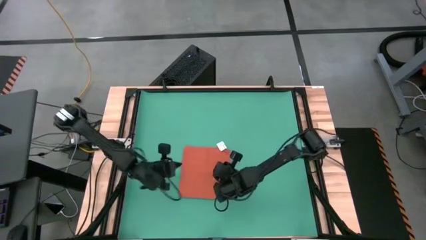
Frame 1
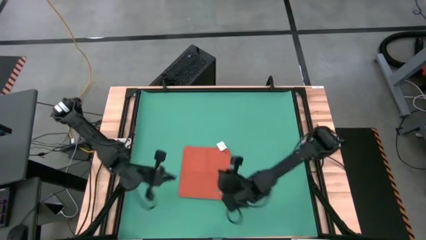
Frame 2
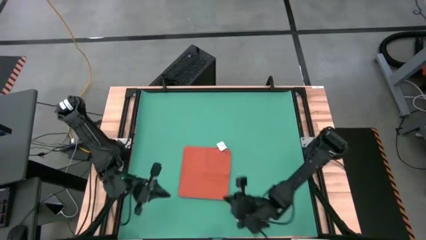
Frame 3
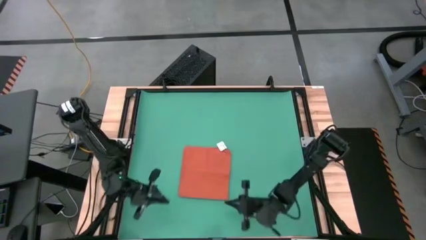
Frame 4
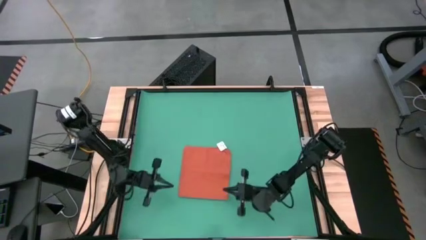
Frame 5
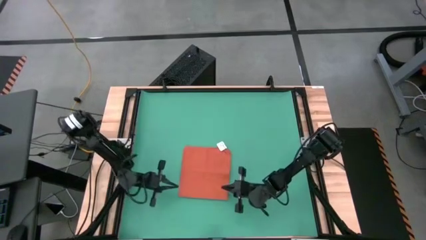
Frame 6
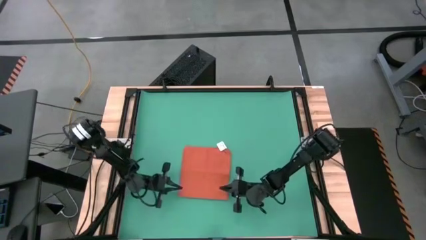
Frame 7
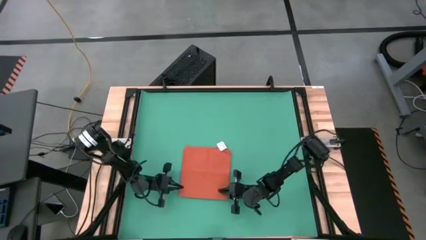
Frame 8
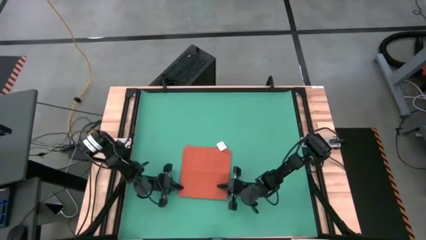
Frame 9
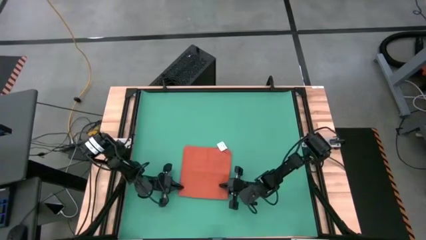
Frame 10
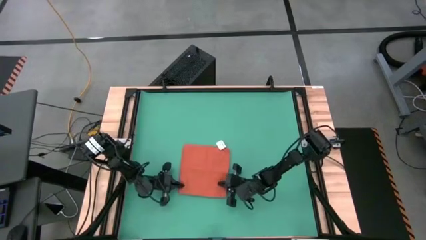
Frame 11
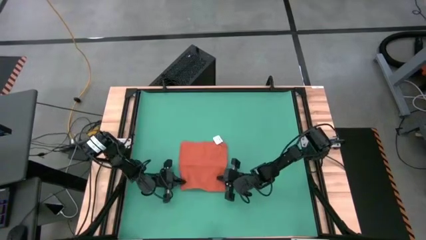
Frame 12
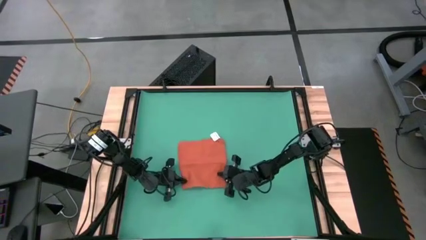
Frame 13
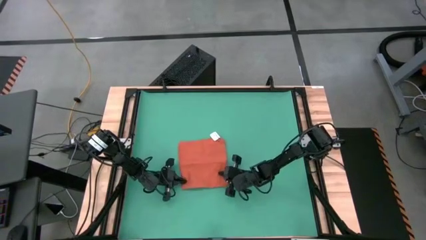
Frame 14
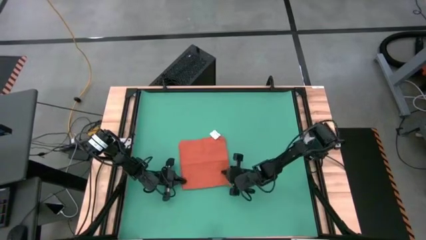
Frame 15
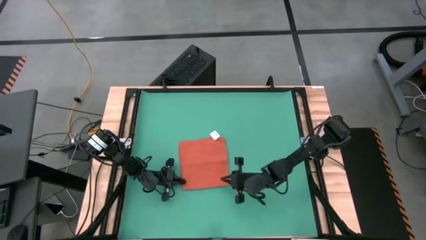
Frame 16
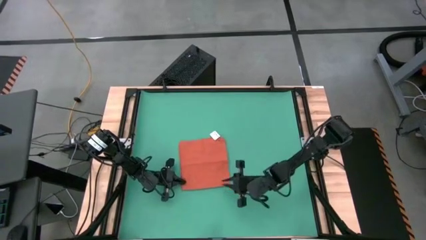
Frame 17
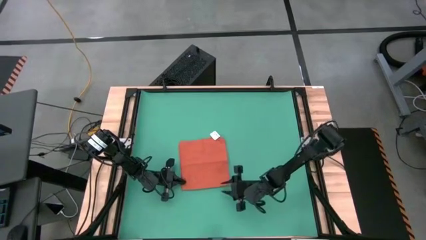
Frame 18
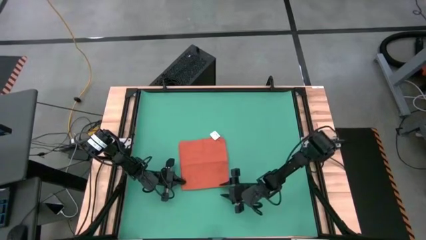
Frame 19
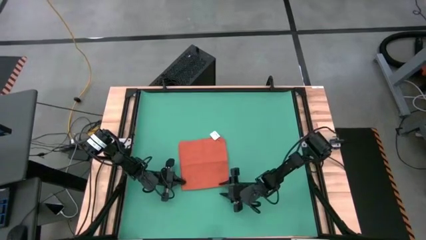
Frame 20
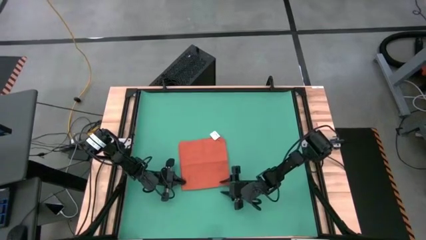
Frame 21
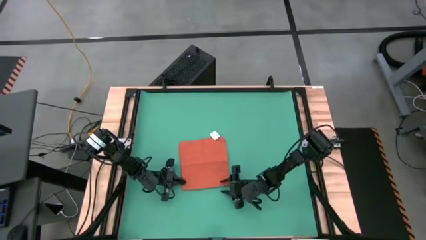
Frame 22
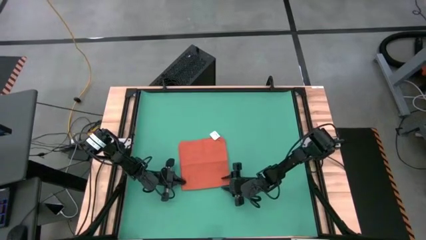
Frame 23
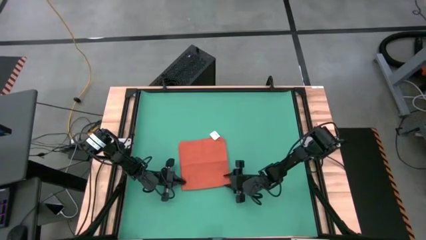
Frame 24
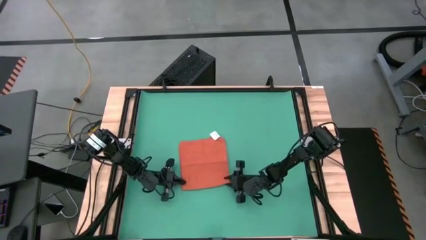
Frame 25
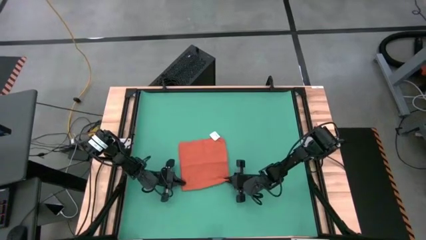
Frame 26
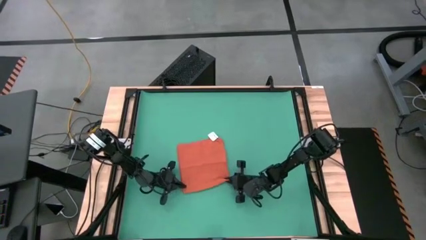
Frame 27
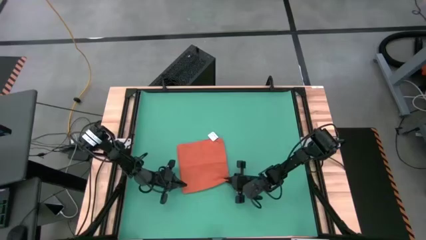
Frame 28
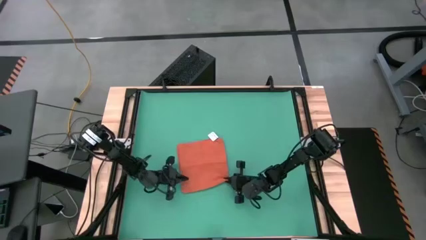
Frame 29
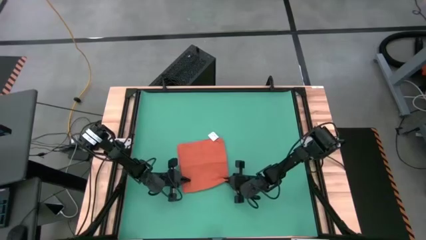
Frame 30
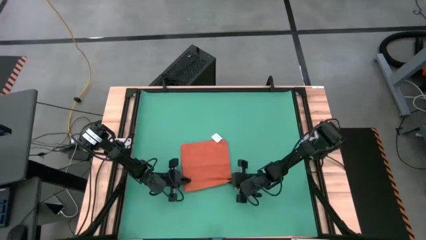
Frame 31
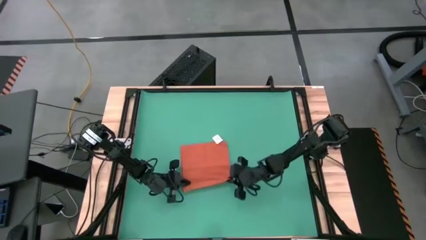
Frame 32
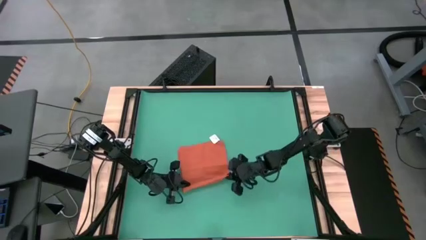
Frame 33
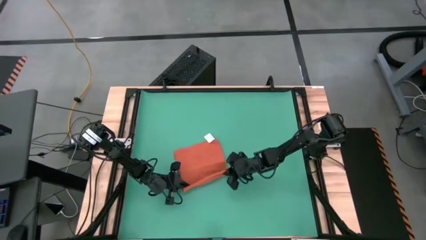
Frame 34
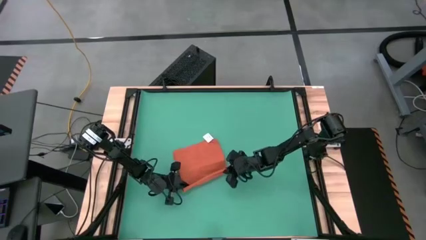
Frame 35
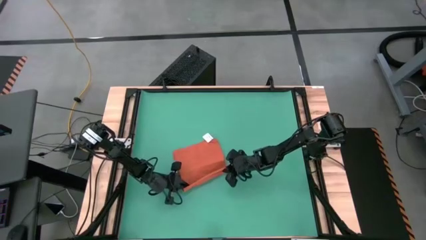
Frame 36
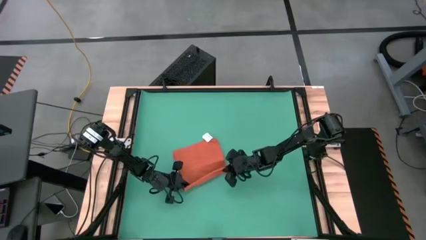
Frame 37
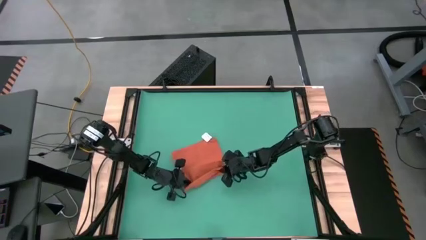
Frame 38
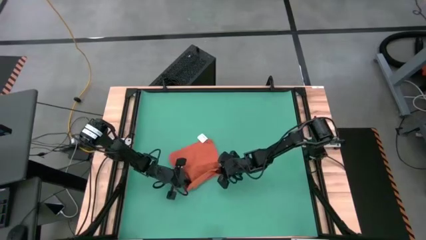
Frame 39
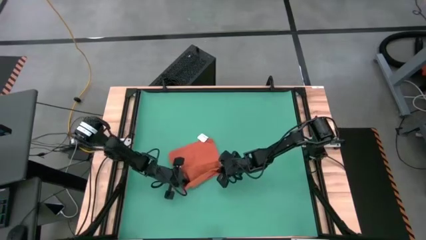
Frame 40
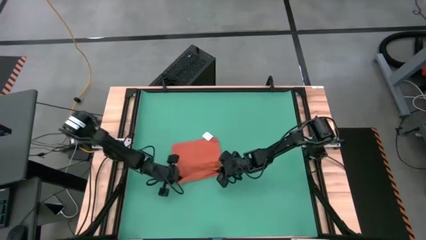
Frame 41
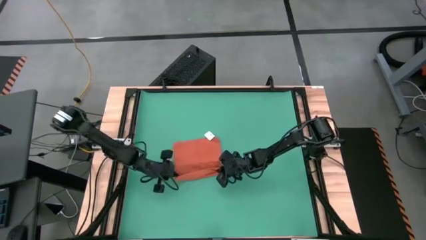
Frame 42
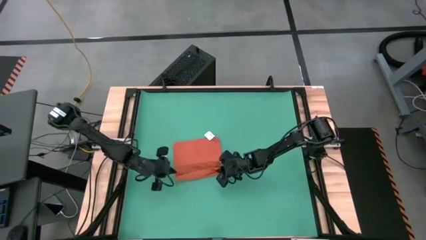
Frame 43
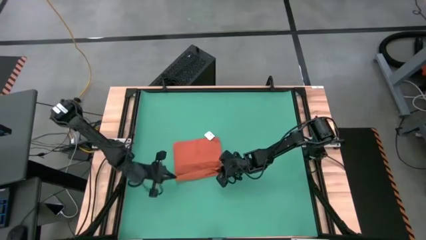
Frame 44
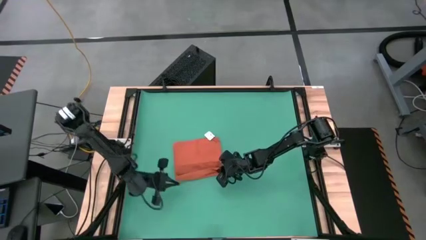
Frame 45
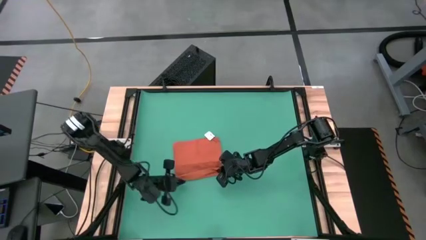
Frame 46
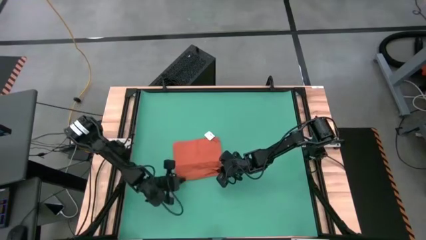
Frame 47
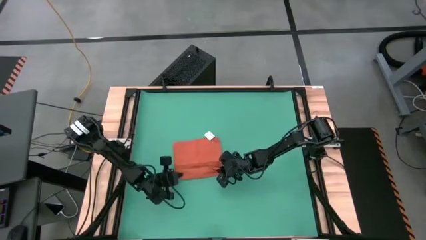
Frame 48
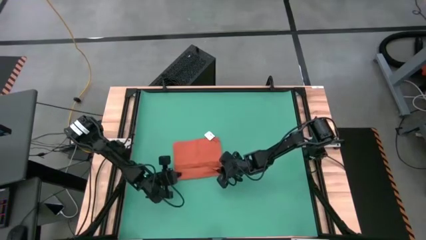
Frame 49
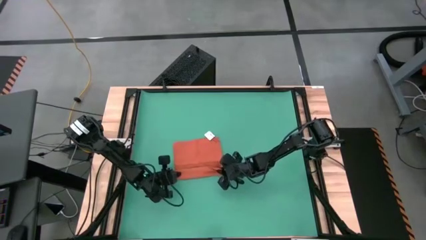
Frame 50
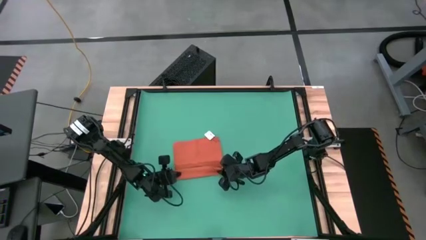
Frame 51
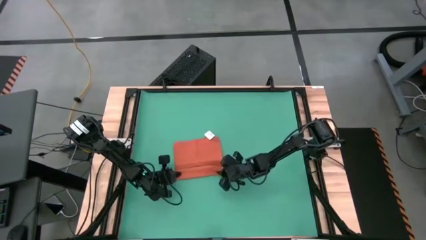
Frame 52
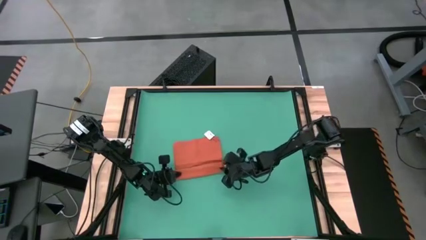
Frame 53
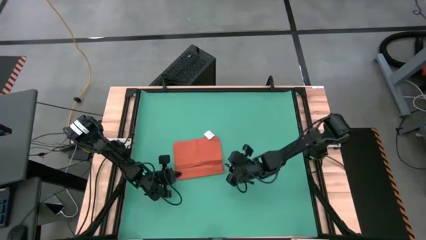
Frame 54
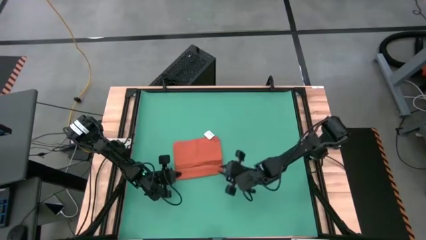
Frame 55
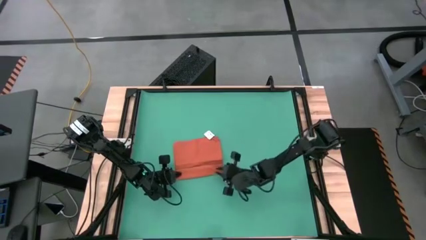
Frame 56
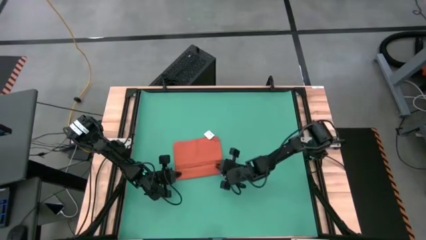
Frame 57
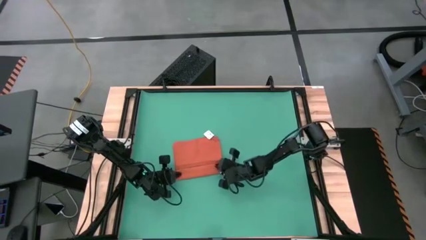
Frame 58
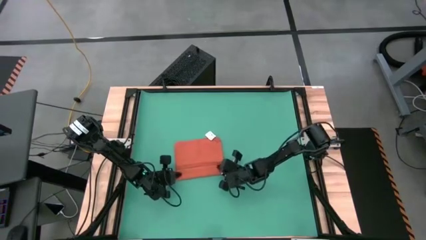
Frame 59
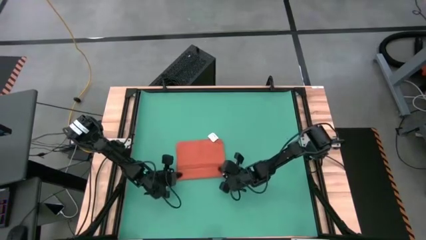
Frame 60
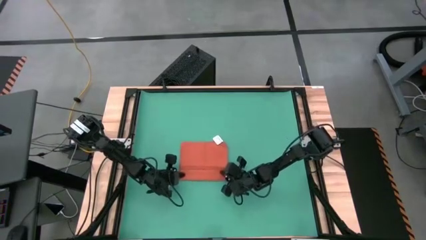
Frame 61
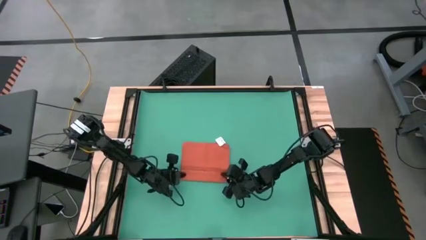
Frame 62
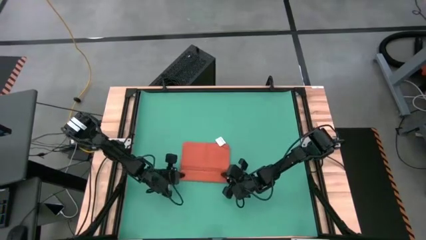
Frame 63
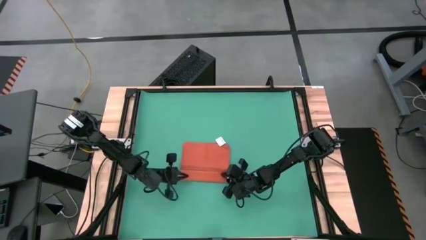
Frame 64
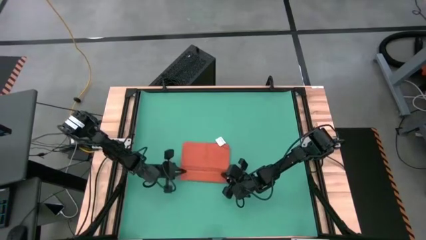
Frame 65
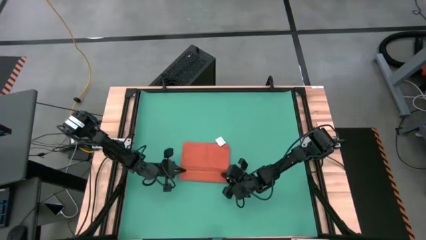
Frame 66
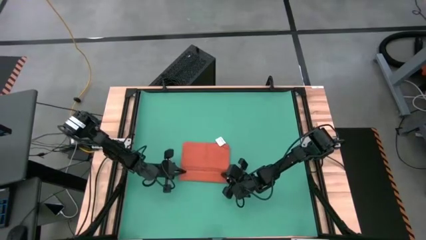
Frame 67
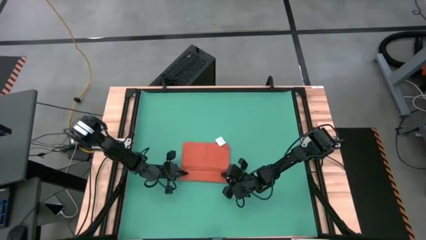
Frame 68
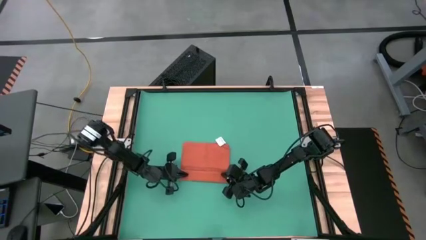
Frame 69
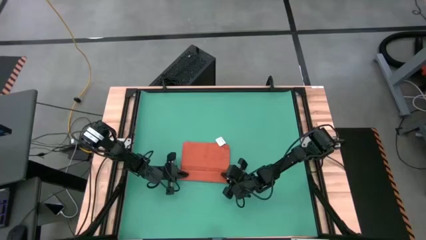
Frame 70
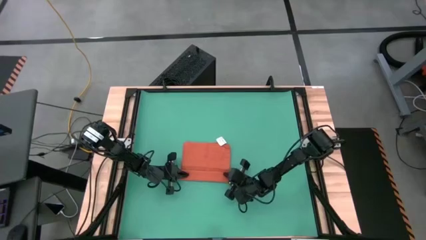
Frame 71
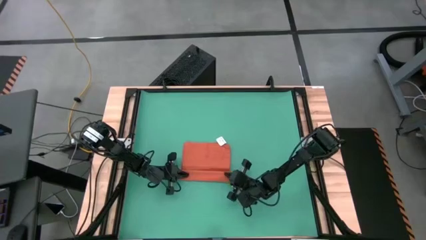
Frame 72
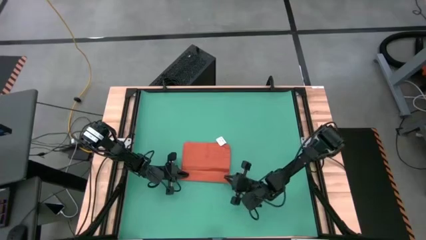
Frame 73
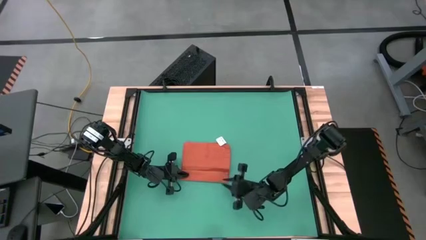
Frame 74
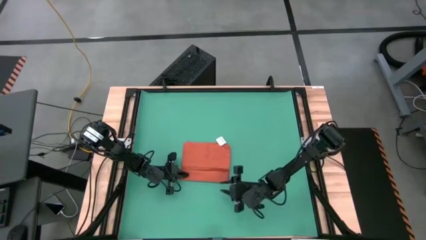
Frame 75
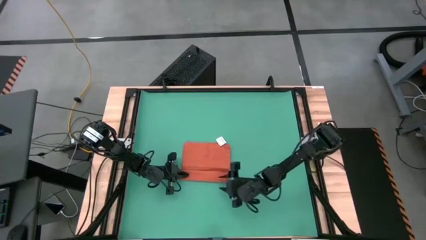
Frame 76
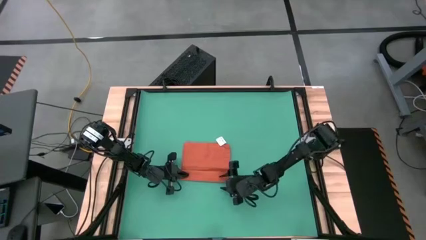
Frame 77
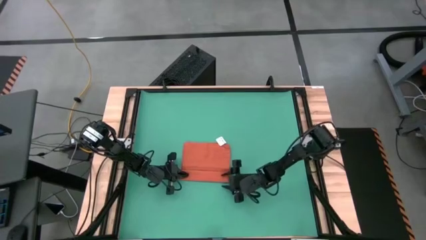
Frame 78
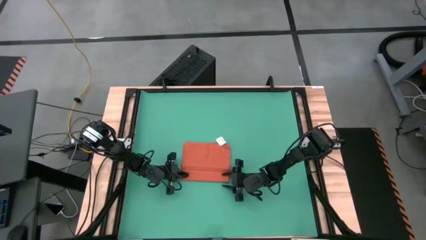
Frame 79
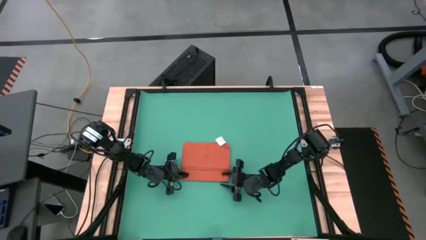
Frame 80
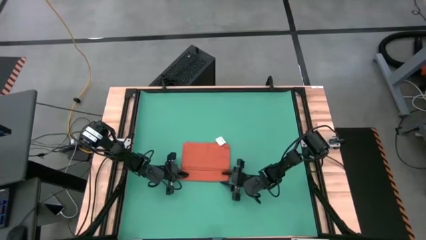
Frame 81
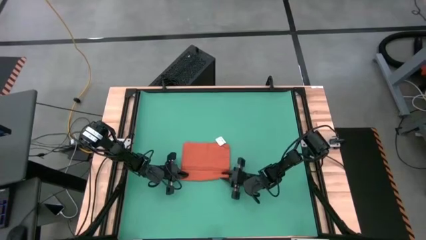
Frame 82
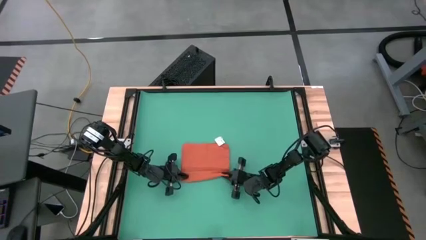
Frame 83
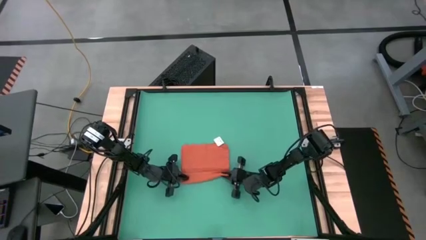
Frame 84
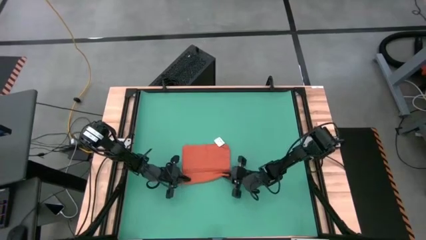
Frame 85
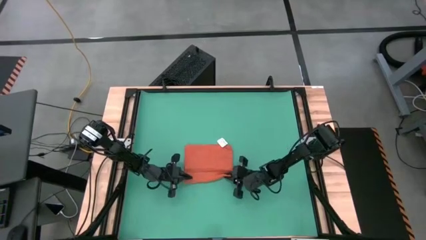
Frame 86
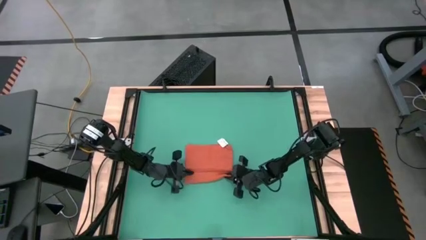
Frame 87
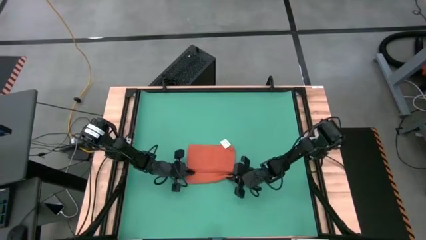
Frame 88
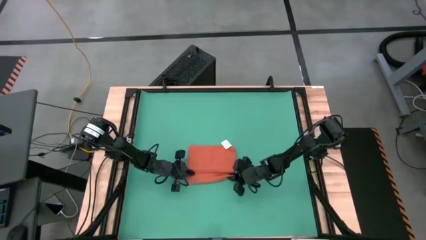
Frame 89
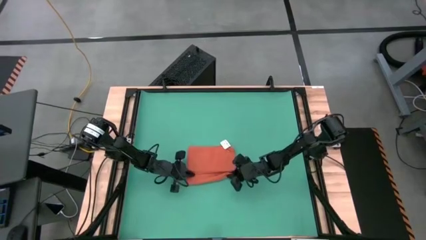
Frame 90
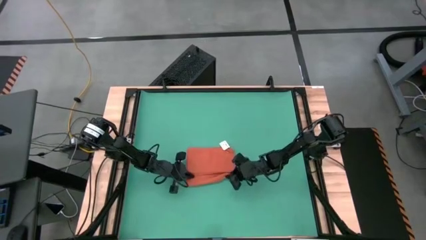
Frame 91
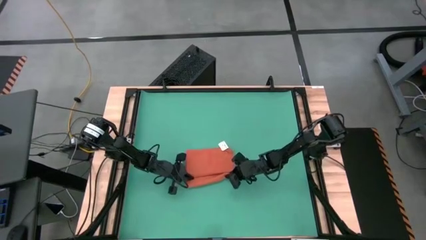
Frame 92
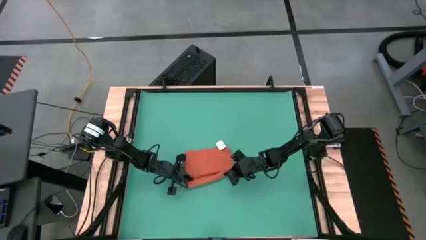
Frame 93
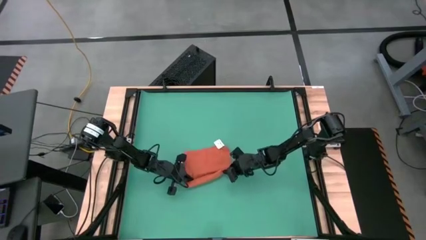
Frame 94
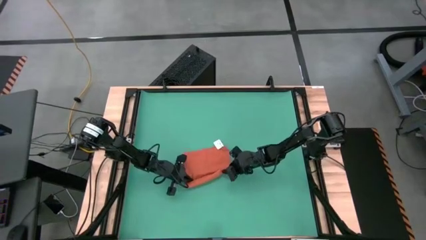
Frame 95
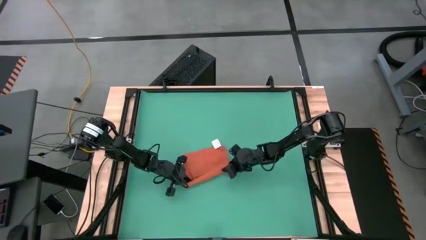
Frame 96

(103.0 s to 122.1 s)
Task: Roll napkin
Roll the orange table napkin
